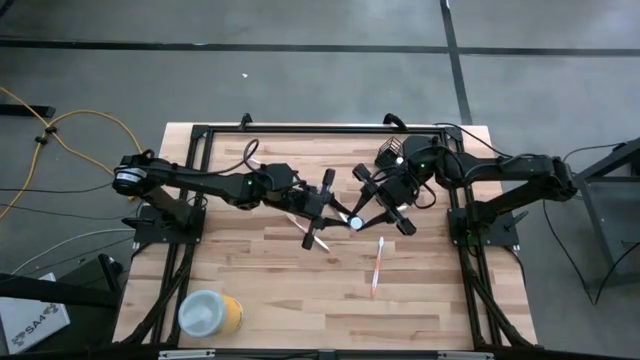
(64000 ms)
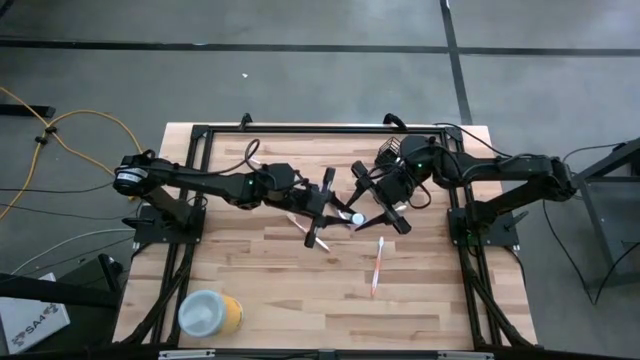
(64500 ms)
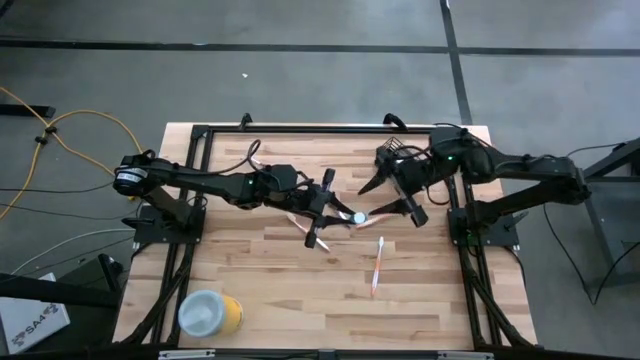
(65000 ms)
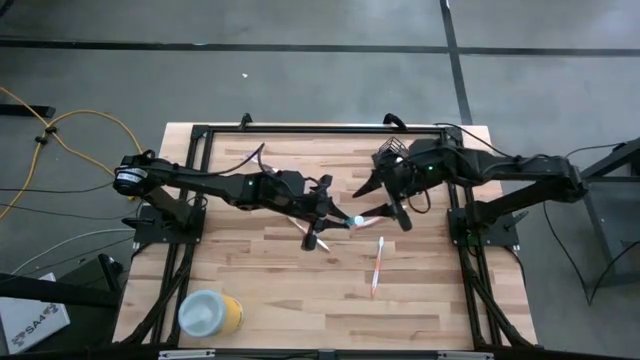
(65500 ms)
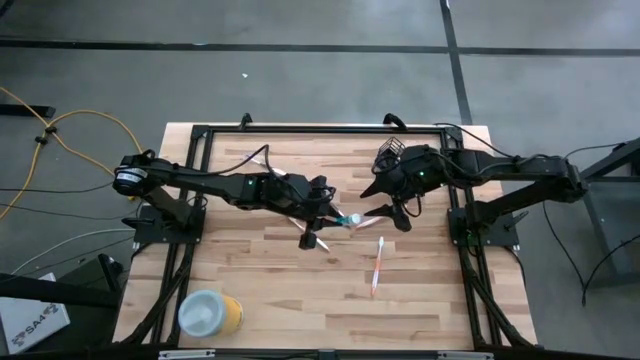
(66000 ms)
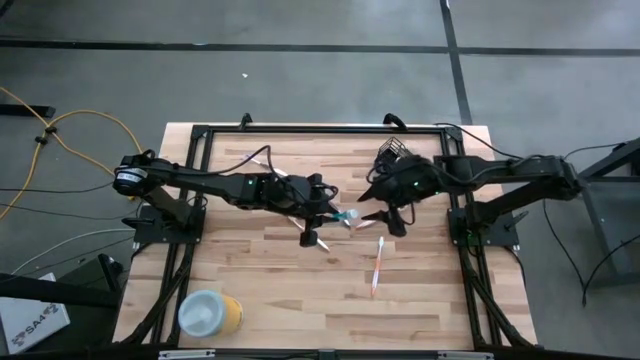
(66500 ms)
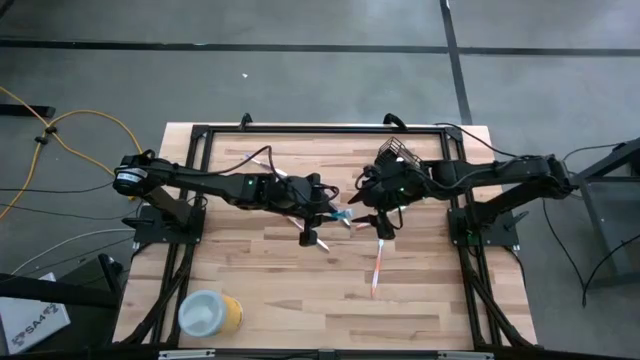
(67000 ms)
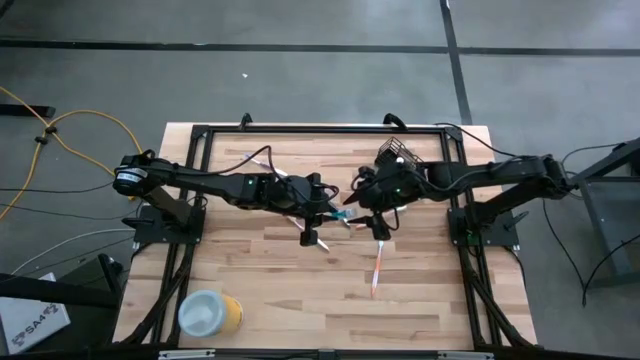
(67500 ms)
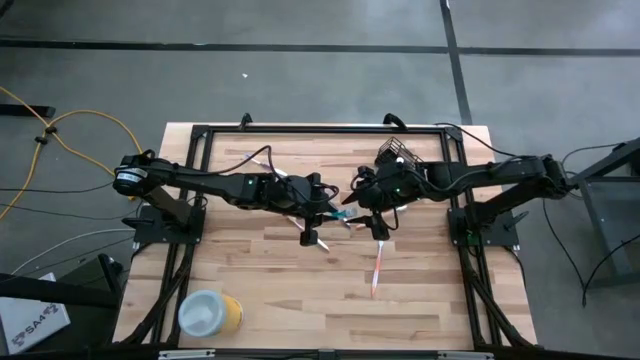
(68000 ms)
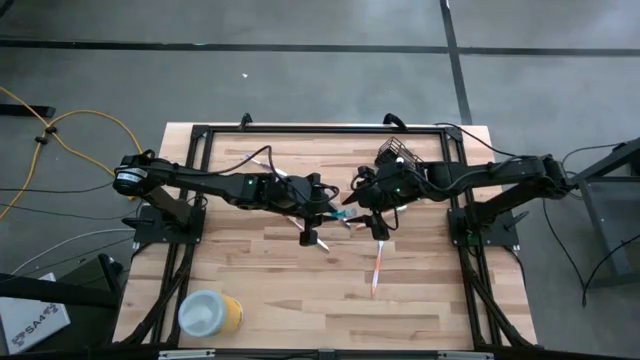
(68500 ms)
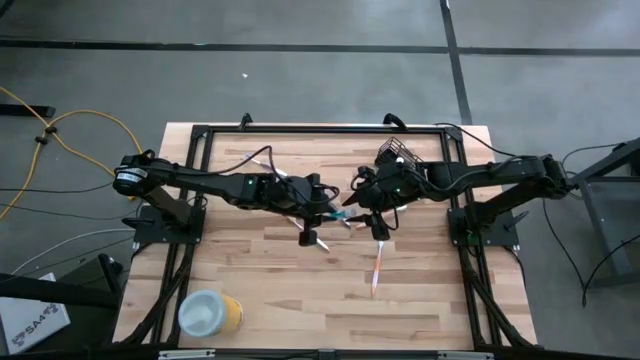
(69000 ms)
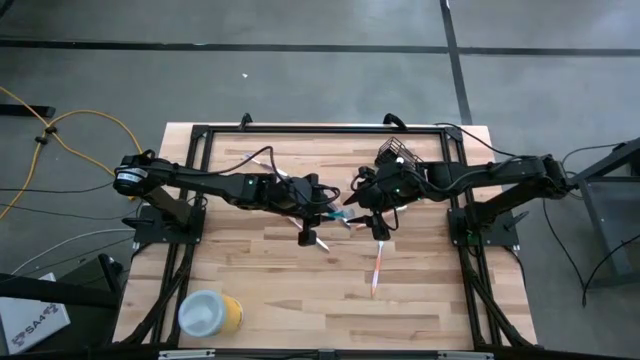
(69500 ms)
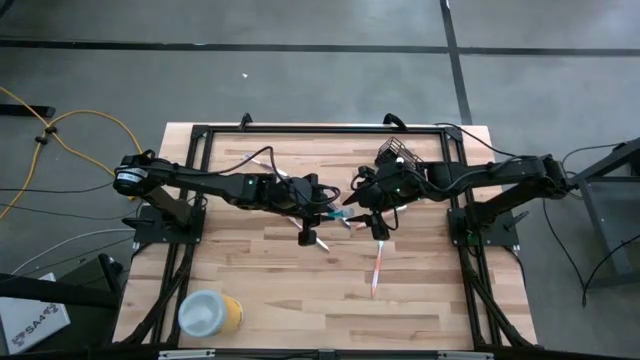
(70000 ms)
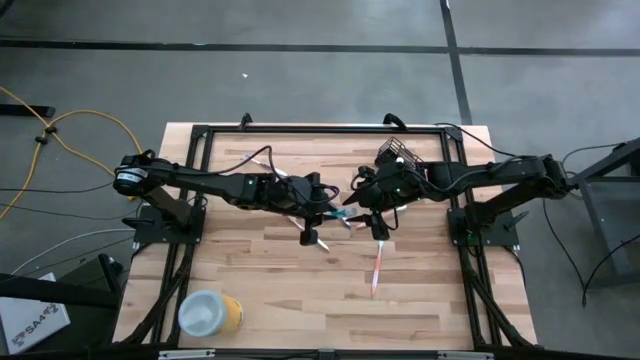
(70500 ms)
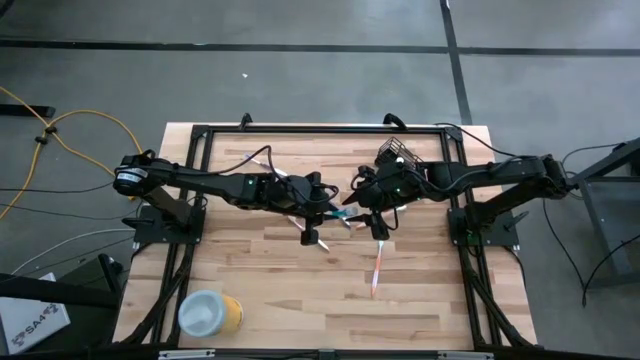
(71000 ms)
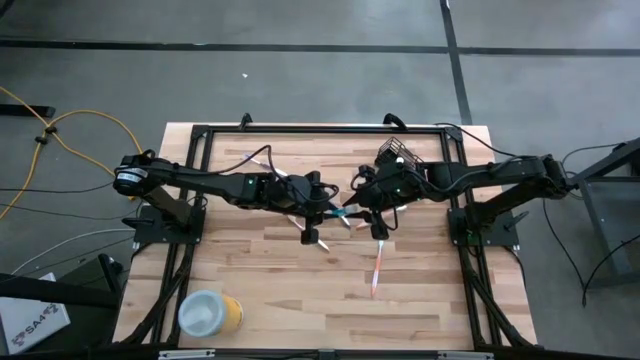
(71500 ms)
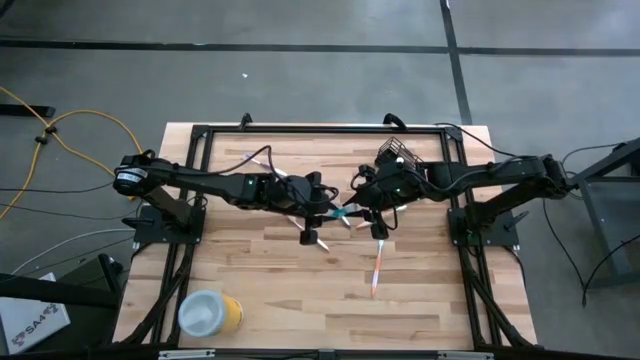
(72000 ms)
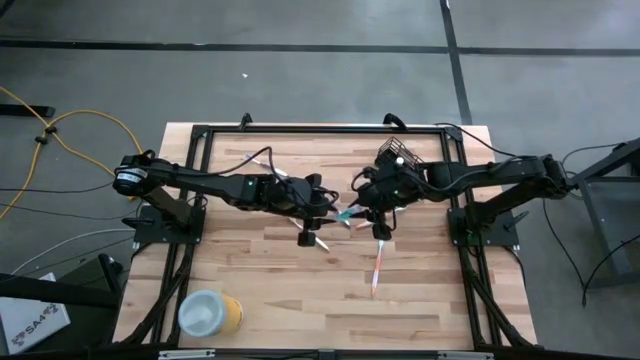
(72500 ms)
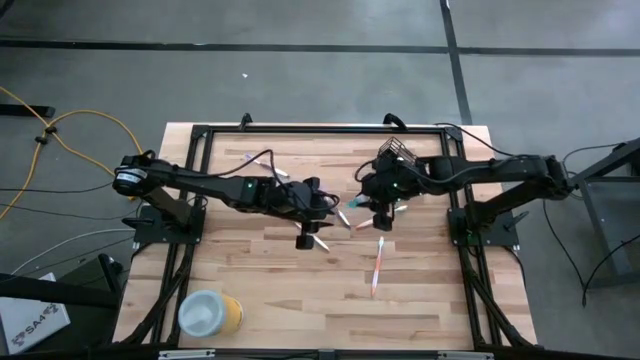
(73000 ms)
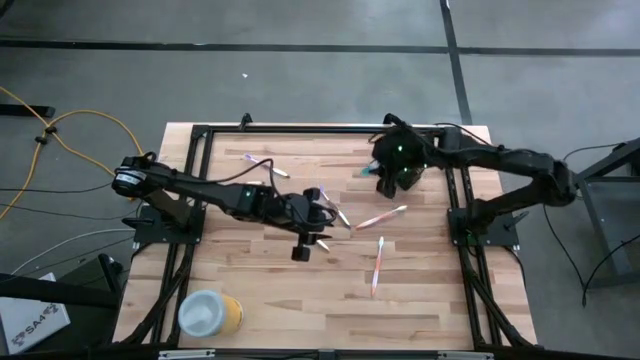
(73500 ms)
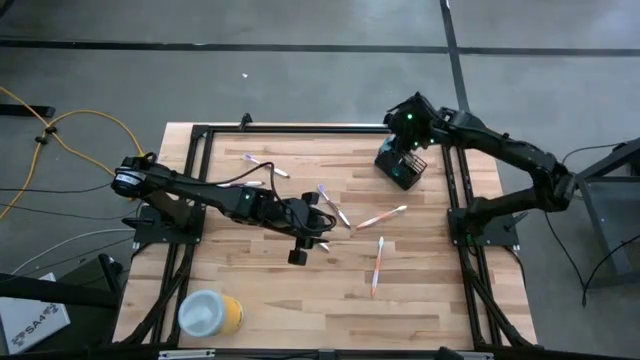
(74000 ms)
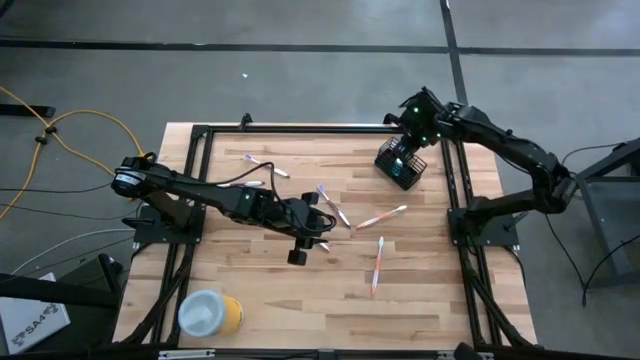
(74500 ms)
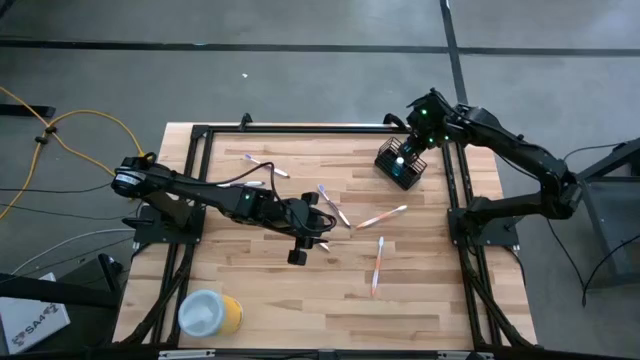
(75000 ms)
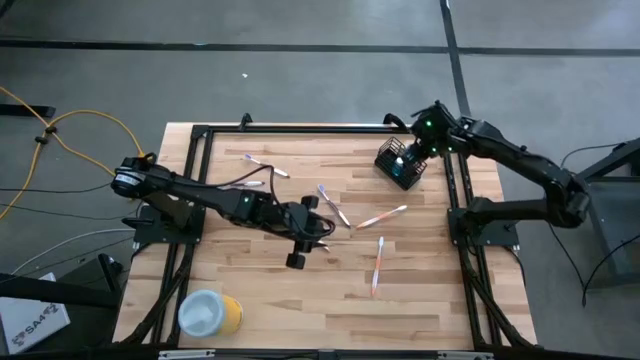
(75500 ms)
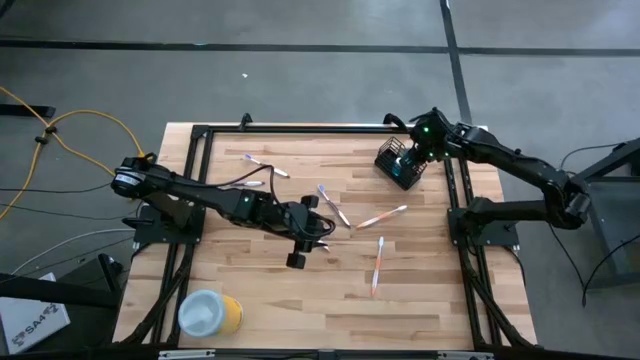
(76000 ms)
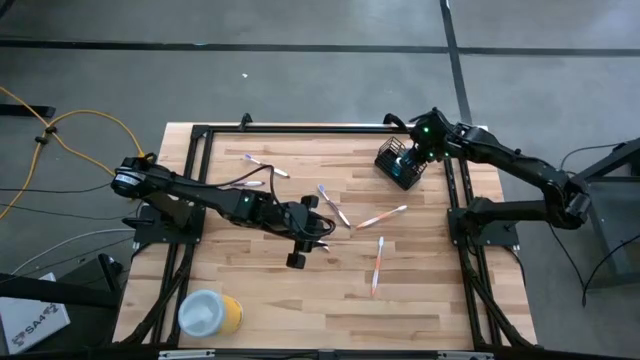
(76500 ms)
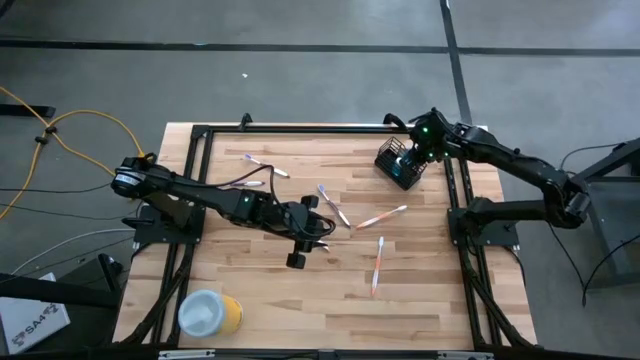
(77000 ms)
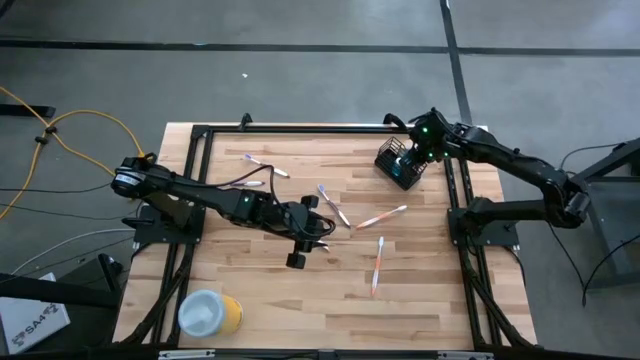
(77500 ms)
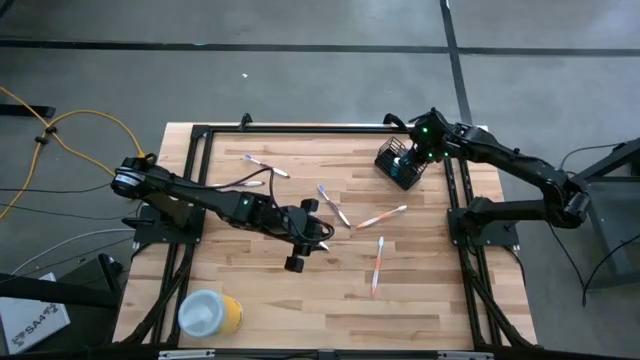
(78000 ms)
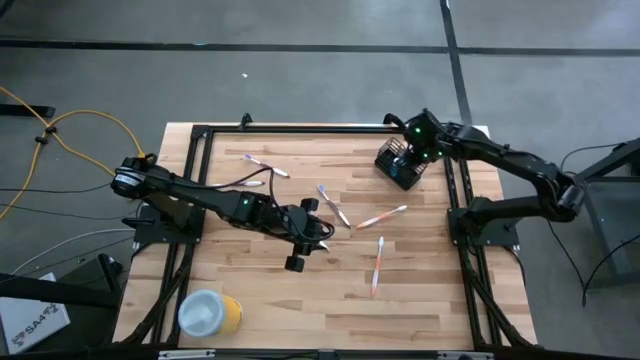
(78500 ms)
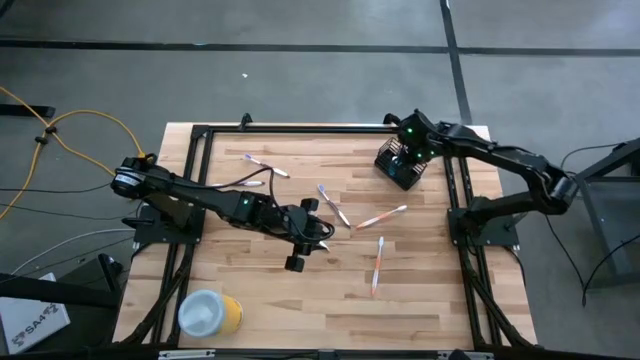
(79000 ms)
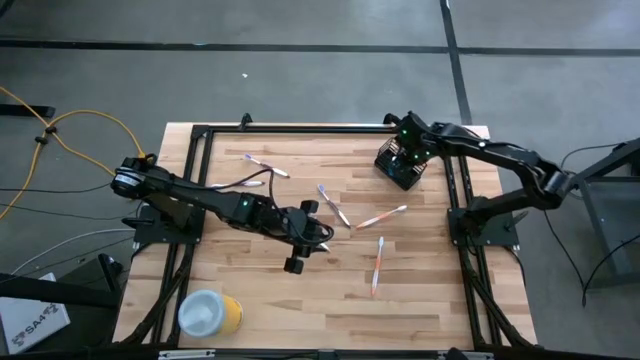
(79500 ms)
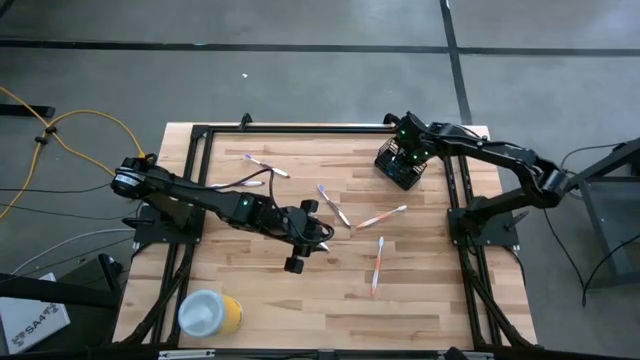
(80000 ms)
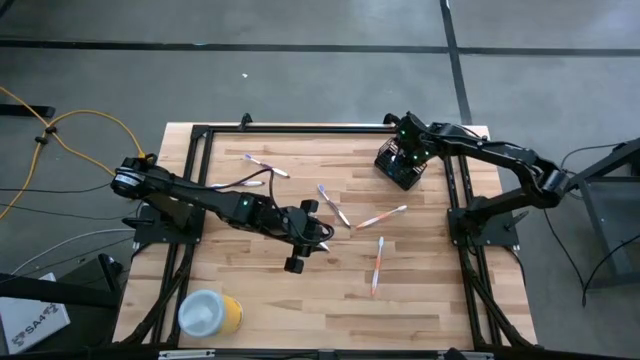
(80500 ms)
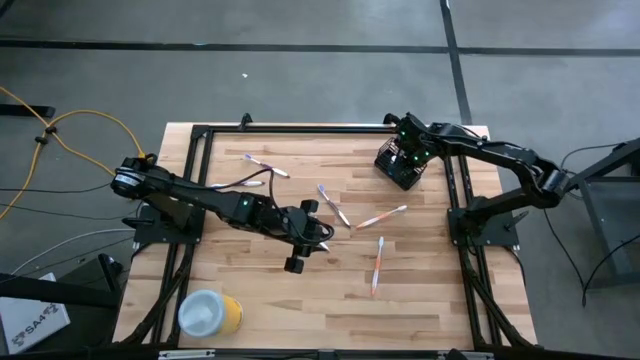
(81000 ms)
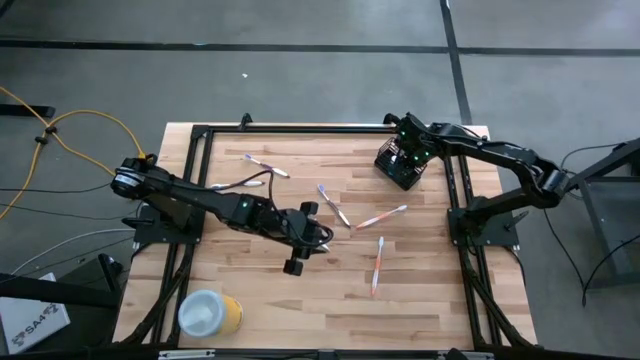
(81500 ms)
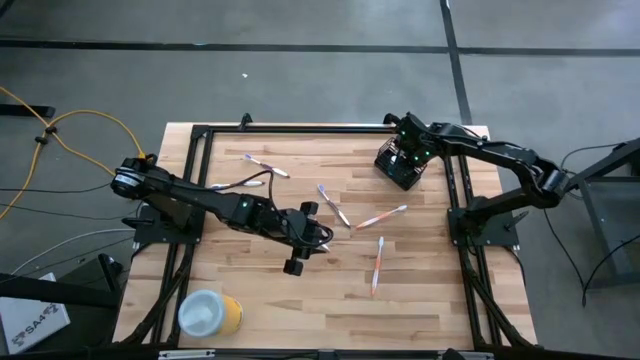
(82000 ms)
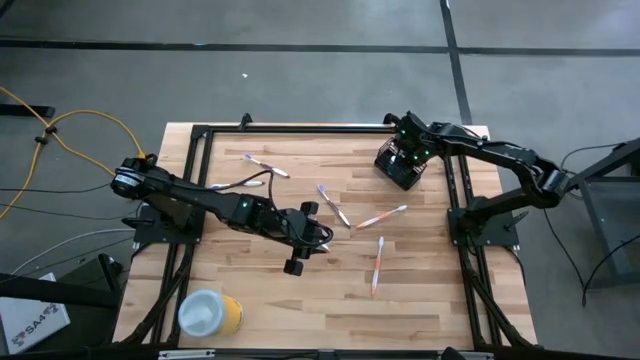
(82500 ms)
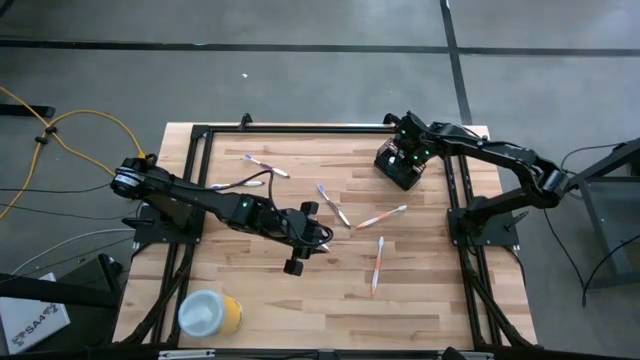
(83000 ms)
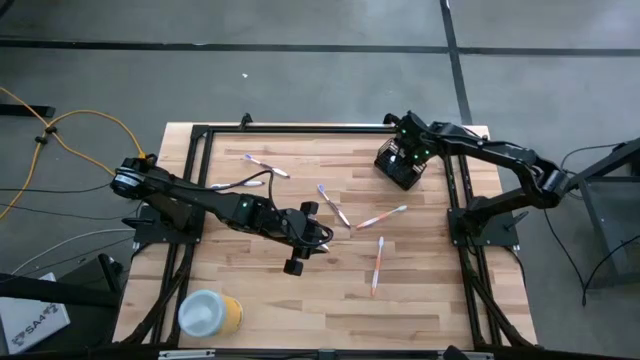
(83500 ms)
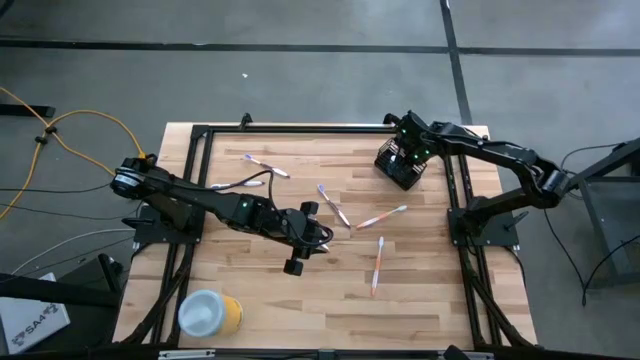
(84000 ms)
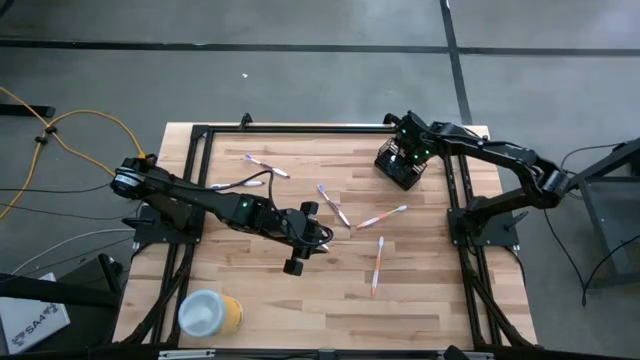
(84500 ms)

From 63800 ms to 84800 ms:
Task: Pick & Place toothbrushing station
Put the blue mouthwash bottle into the middle of the black mesh organizer
